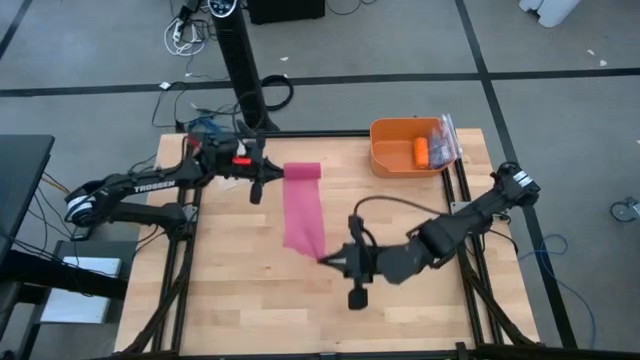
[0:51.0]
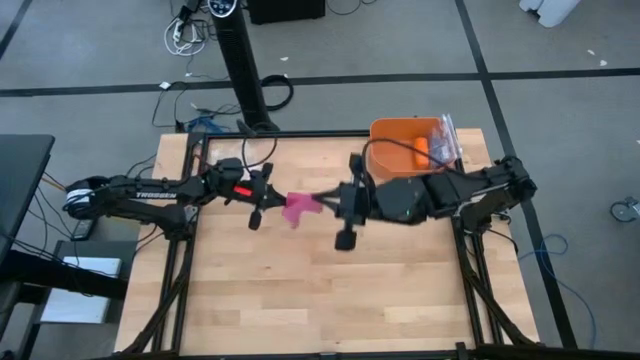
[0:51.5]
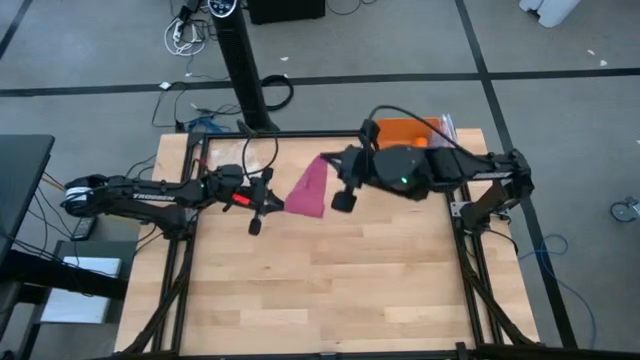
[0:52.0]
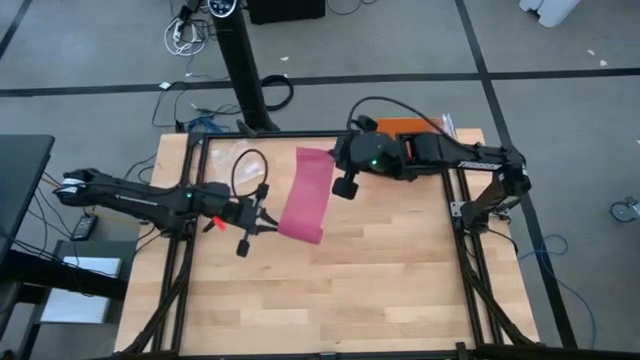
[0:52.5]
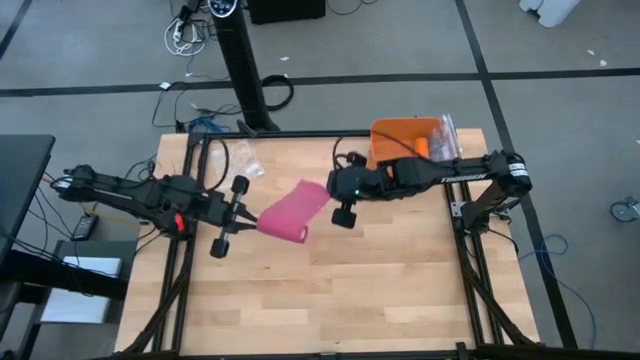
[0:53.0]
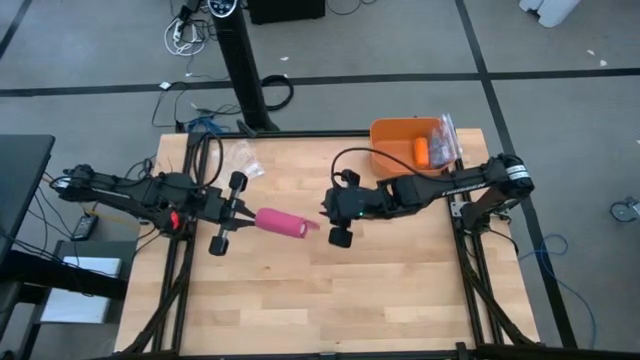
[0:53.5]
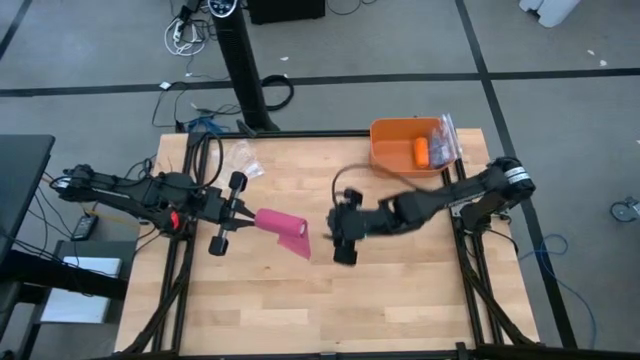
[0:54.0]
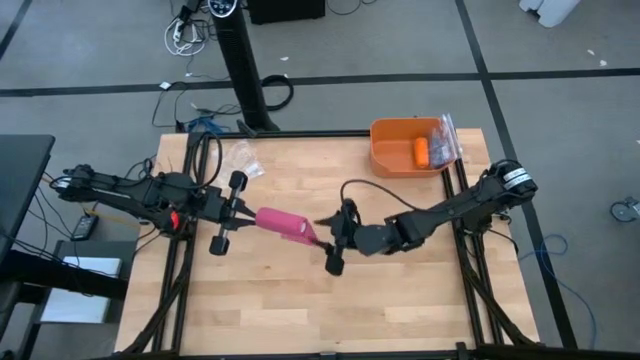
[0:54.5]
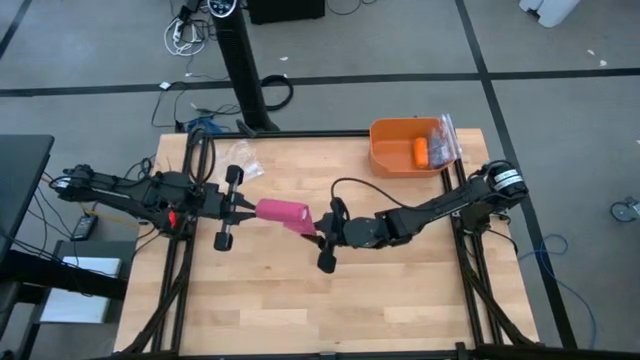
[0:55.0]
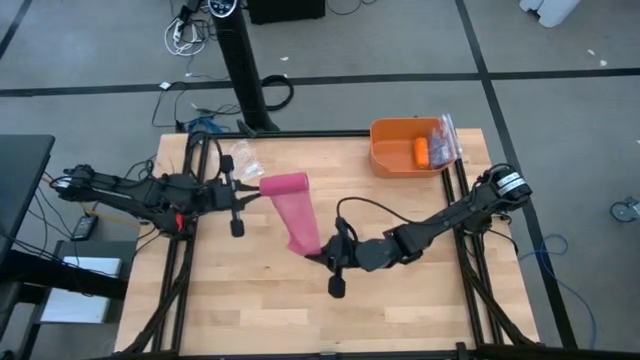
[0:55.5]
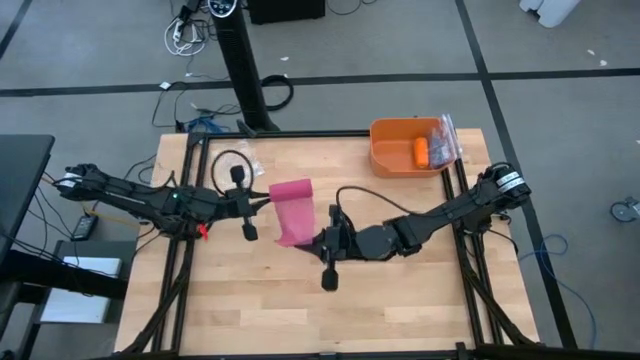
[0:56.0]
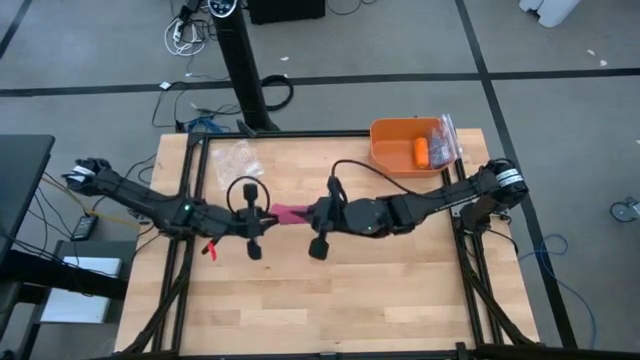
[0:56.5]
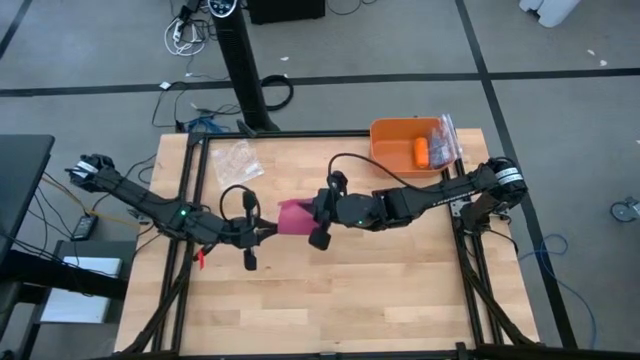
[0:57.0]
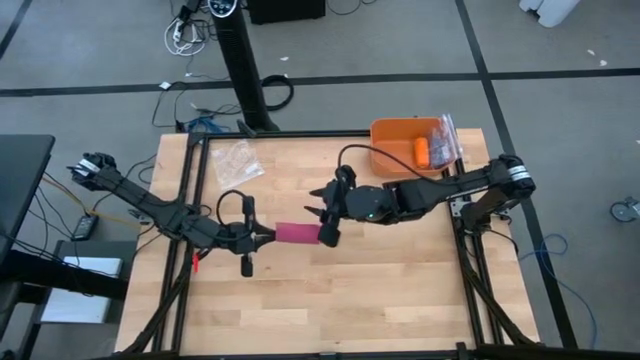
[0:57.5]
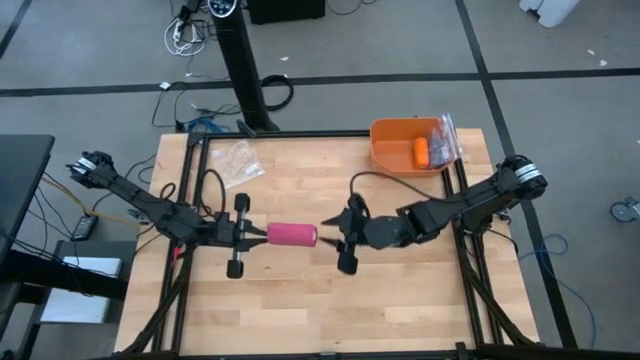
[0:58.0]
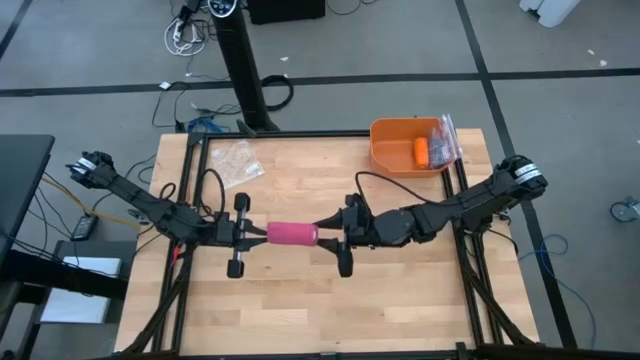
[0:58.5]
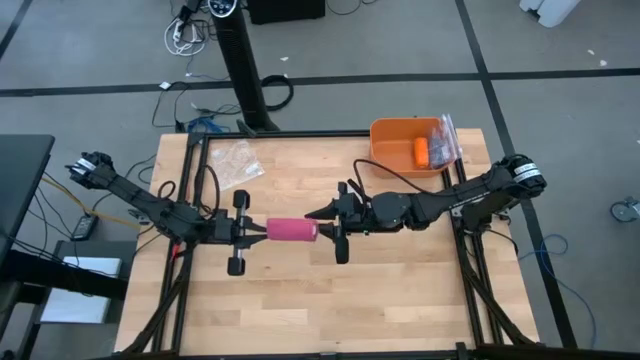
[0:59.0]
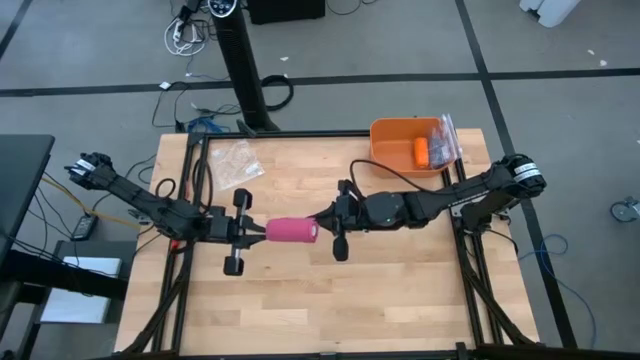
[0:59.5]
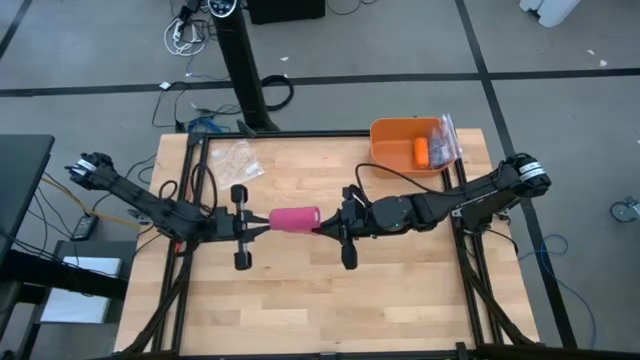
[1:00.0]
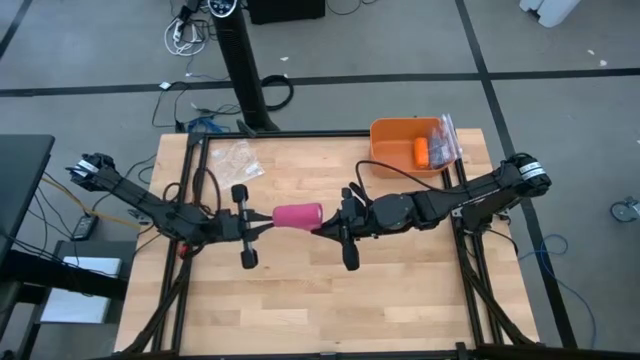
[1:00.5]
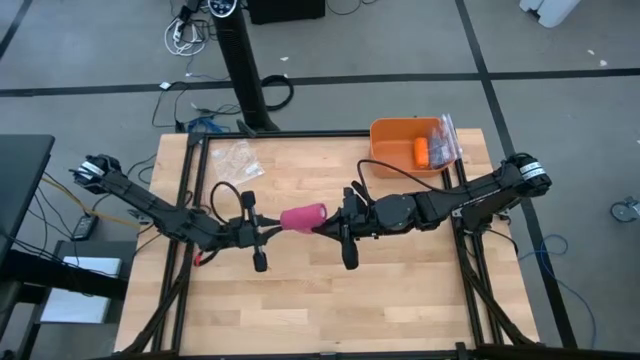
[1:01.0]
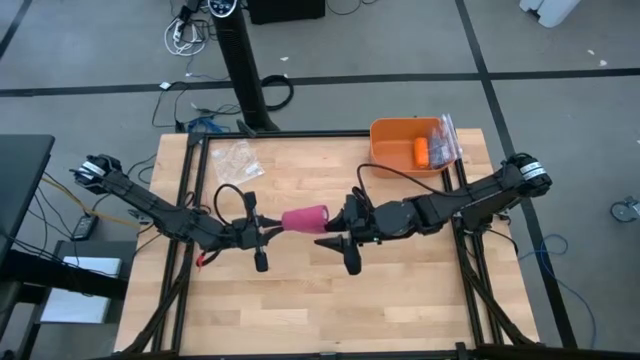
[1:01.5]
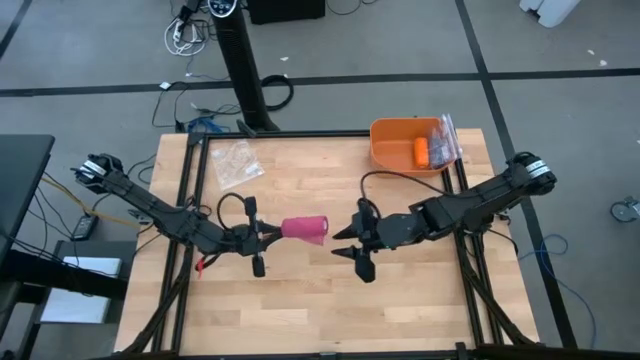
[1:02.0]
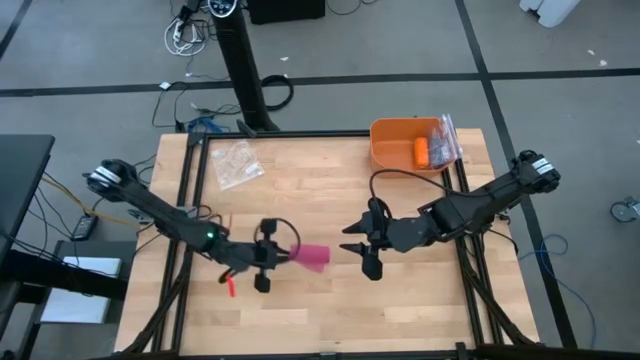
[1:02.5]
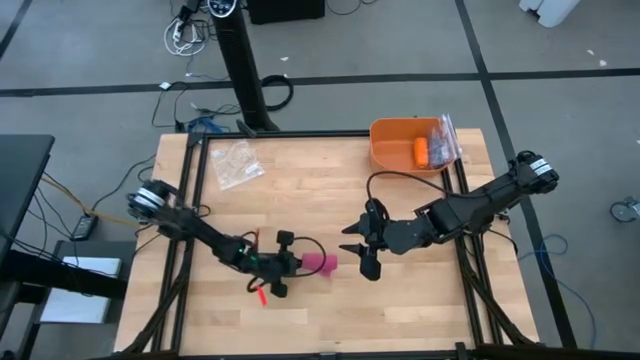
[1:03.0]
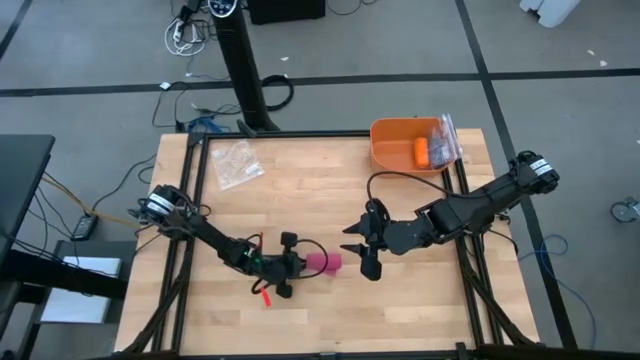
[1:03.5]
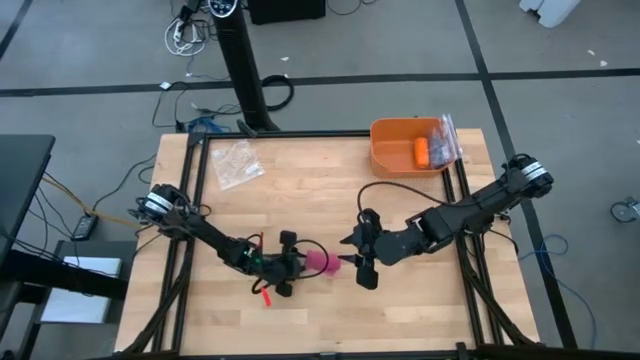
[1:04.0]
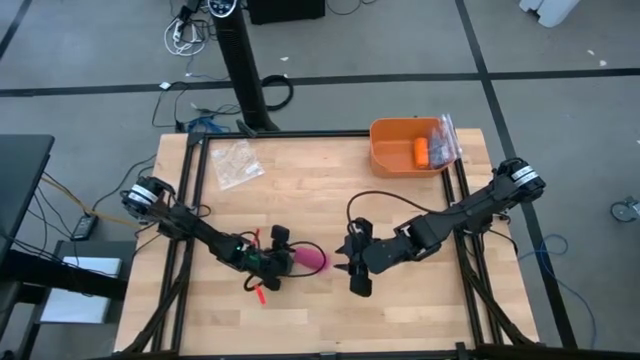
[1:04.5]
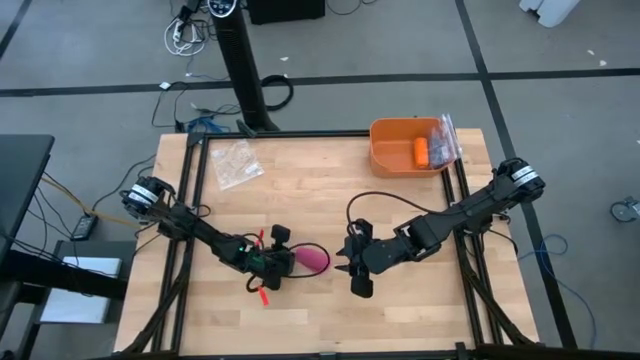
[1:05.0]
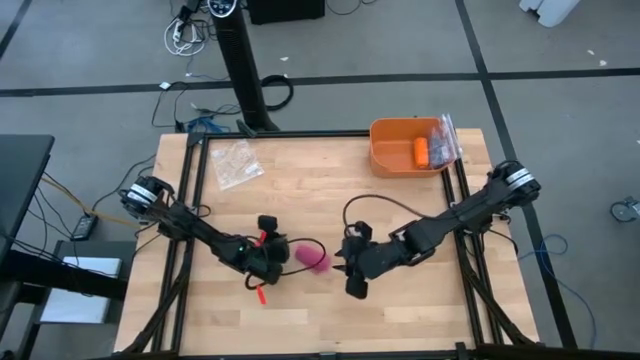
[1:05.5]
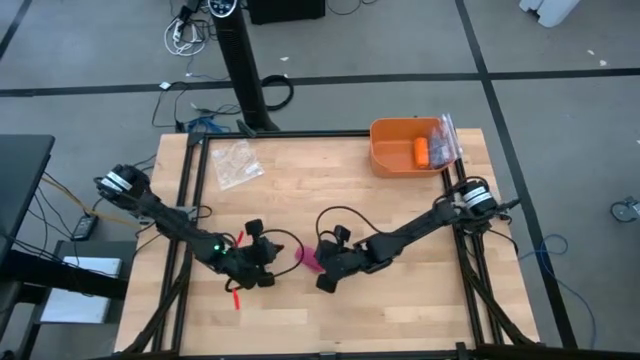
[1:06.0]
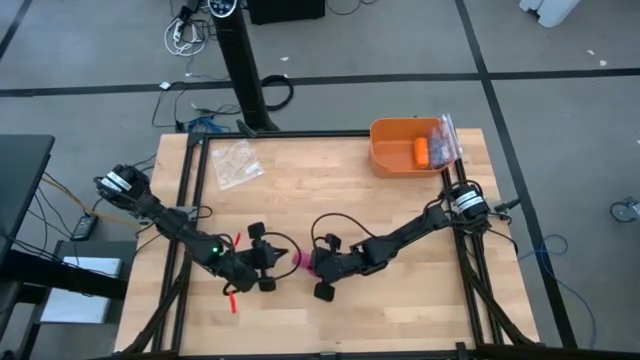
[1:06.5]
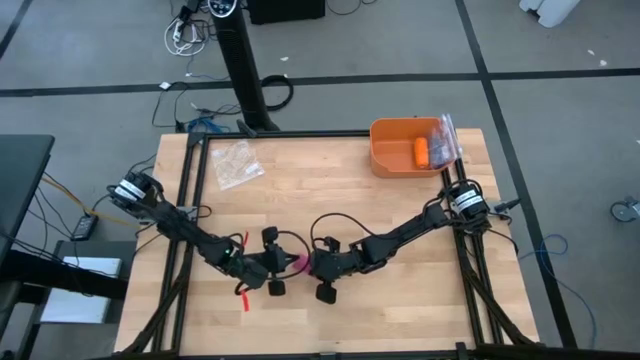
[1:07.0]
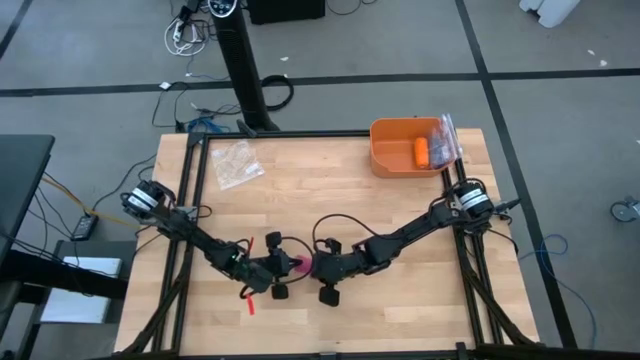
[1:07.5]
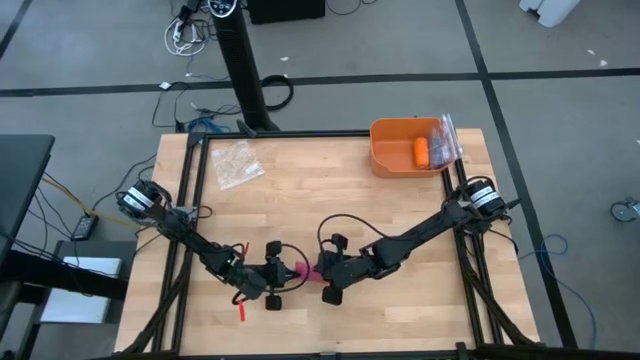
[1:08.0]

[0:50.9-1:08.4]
Task: Roll bandage
Roll the pink bandage

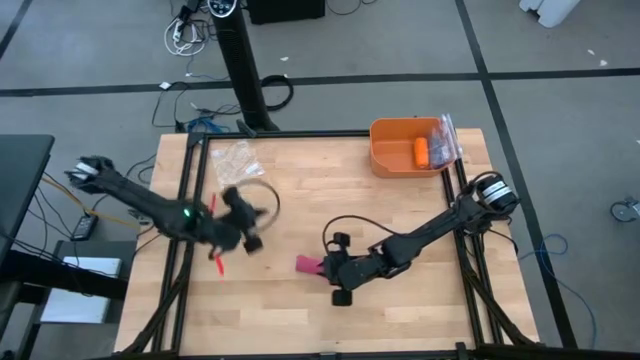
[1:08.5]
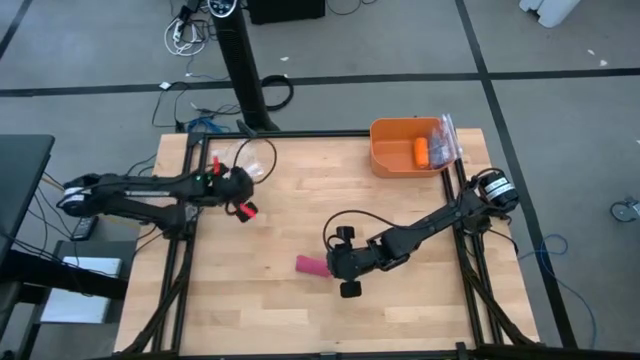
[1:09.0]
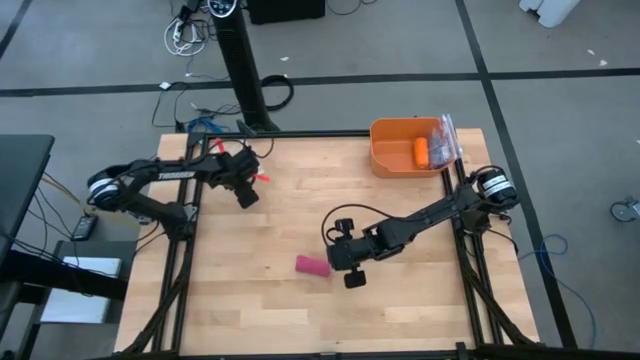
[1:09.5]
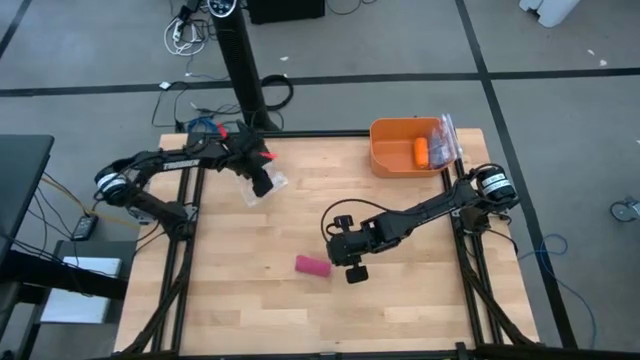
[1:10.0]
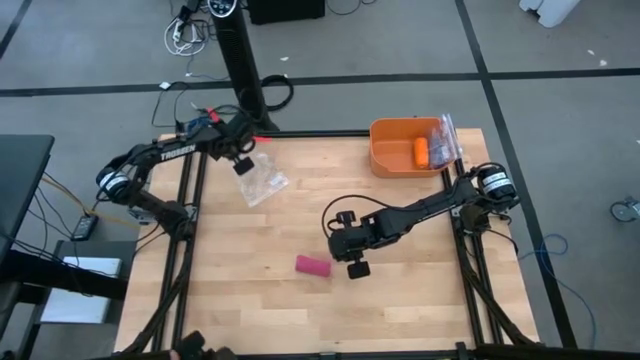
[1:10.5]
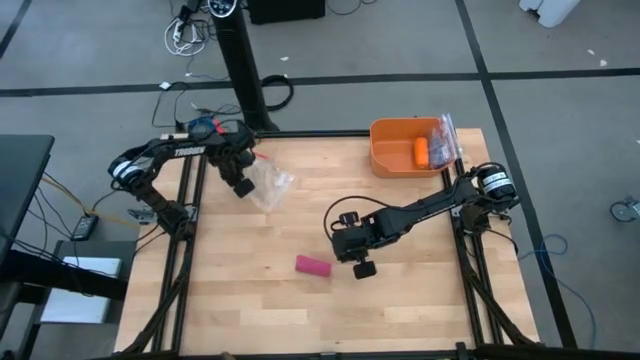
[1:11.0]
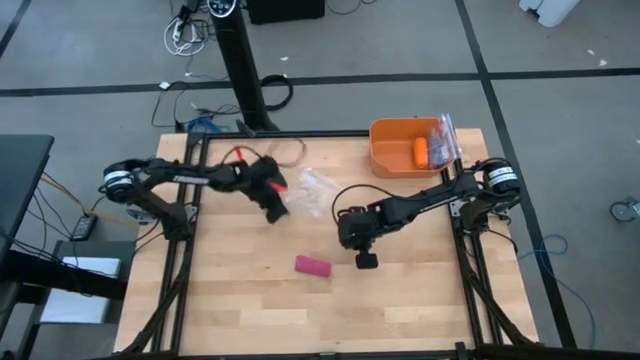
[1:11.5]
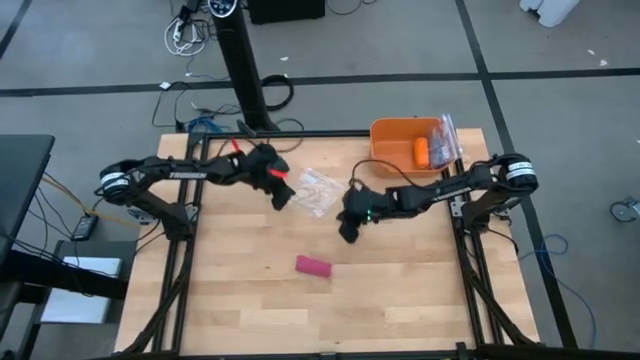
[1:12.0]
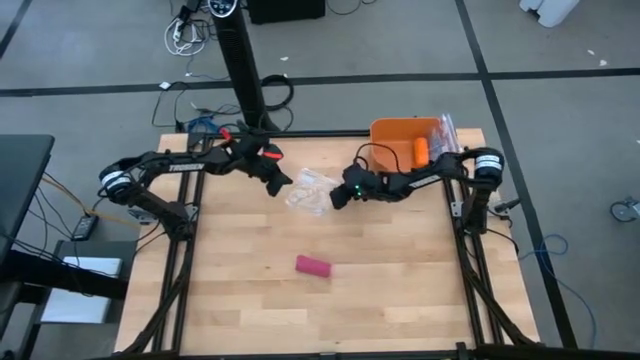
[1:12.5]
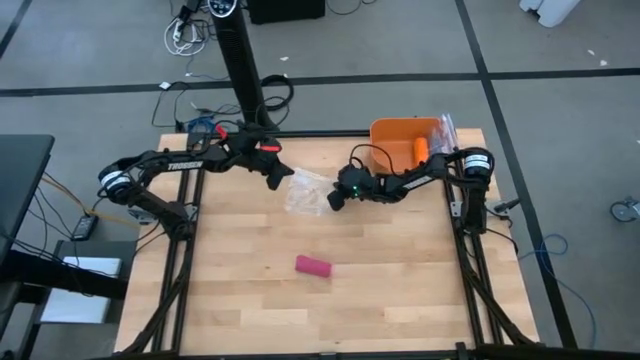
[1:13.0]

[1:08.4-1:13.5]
Open the transparent zip bag
